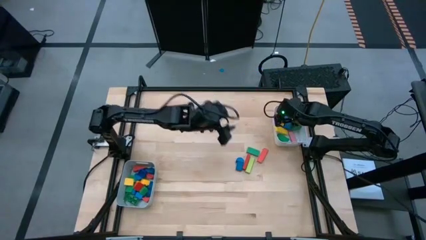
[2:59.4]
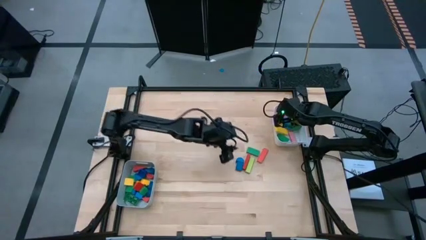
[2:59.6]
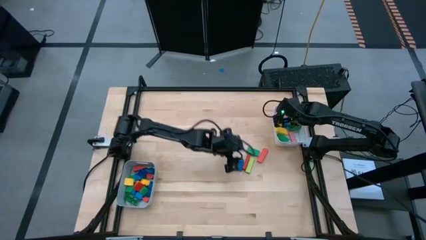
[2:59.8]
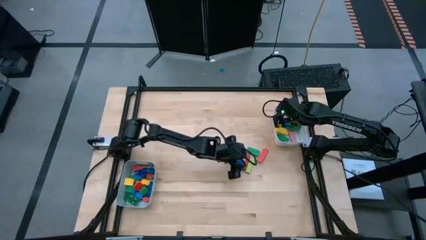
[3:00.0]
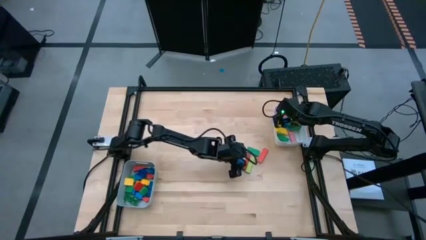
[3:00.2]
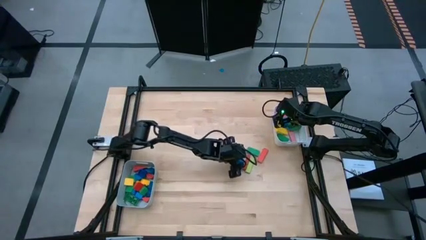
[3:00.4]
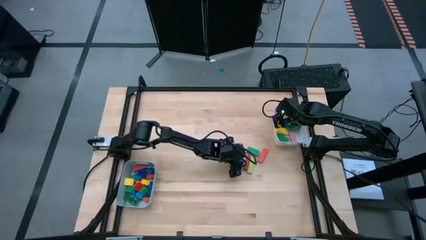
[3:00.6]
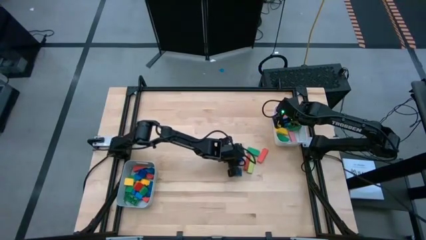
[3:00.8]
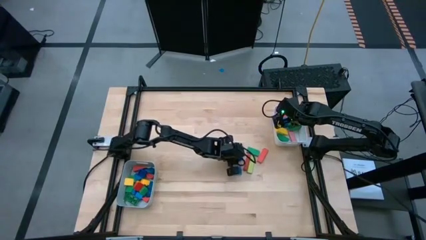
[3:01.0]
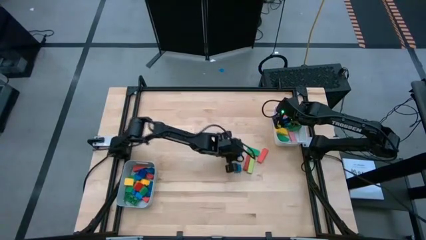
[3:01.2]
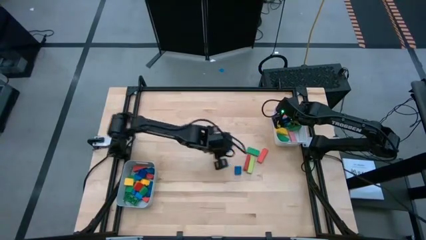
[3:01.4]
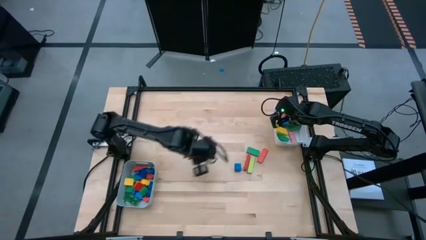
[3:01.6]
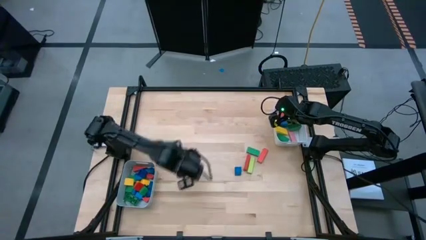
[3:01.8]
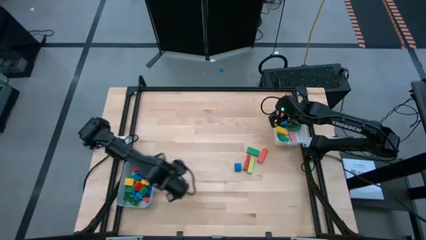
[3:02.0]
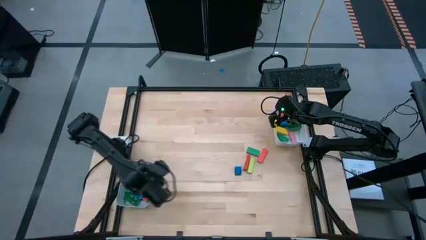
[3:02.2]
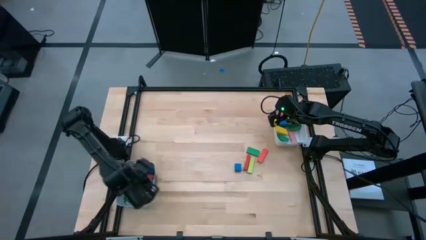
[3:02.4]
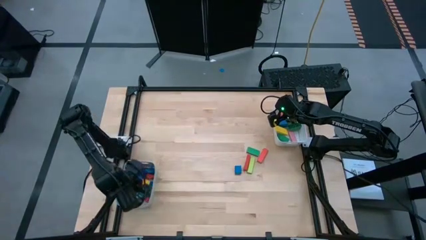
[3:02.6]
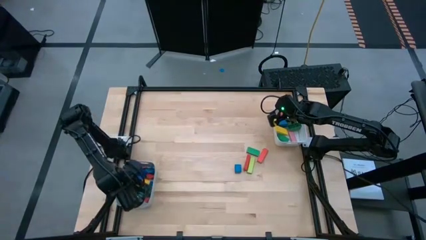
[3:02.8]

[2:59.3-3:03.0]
Task: Sort blocks by size
Put the blue half cylindrical block into the gray bin

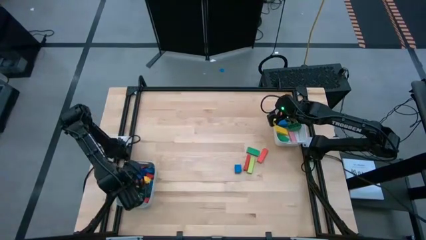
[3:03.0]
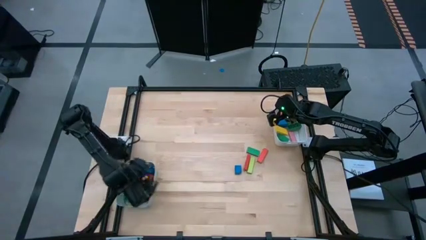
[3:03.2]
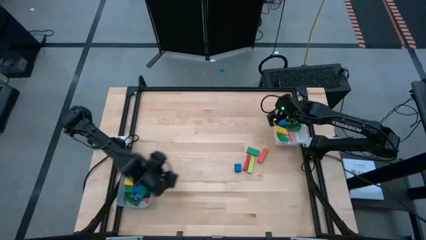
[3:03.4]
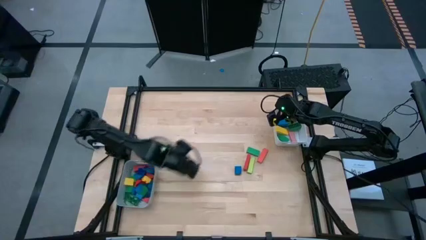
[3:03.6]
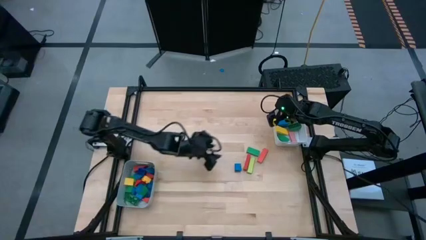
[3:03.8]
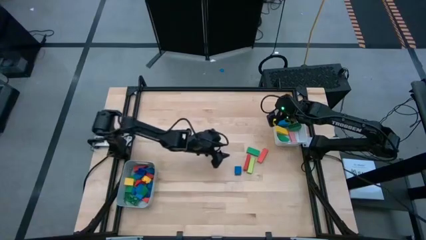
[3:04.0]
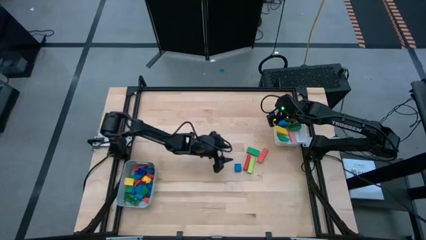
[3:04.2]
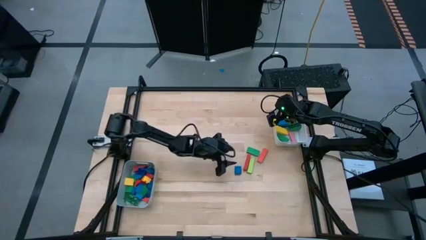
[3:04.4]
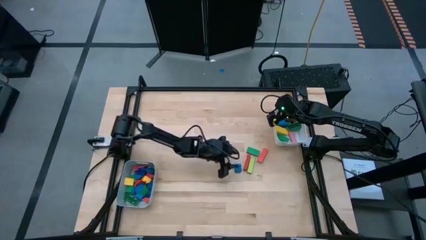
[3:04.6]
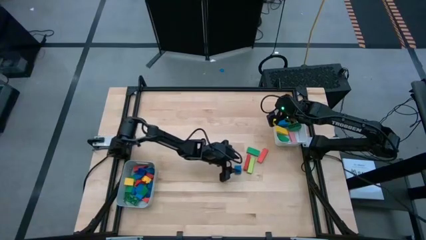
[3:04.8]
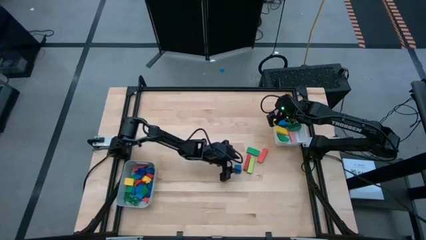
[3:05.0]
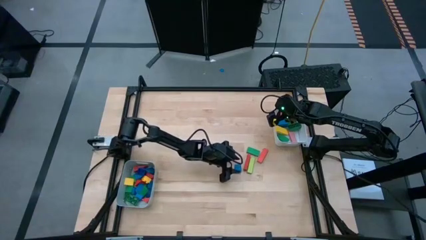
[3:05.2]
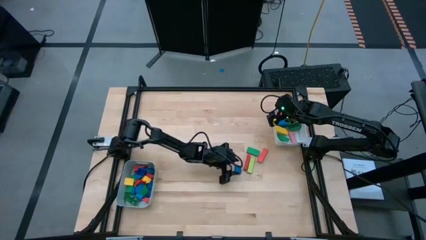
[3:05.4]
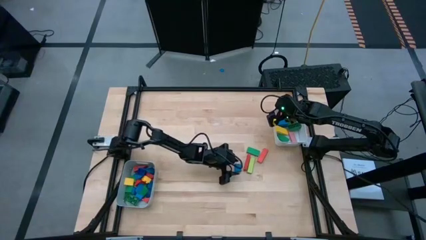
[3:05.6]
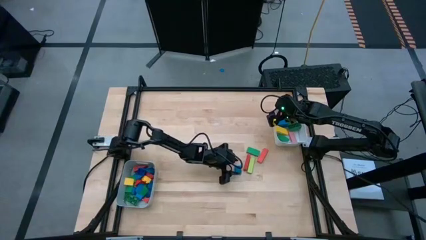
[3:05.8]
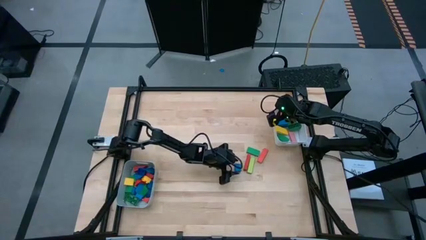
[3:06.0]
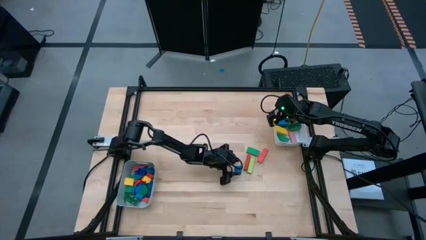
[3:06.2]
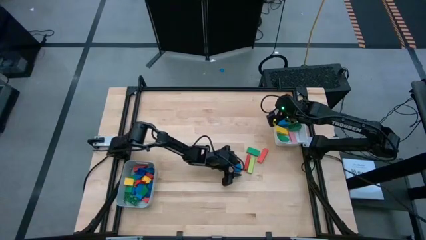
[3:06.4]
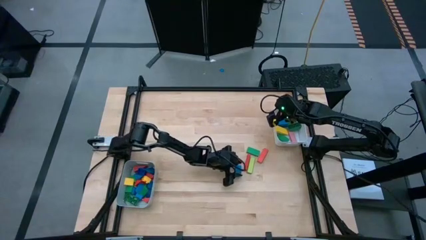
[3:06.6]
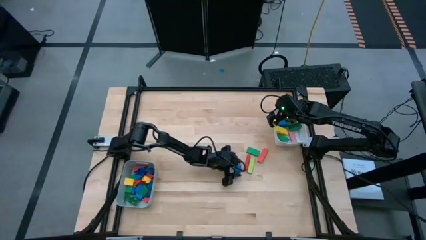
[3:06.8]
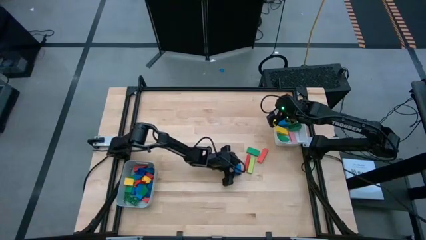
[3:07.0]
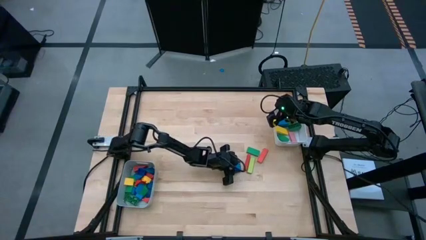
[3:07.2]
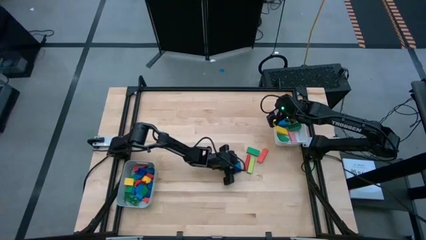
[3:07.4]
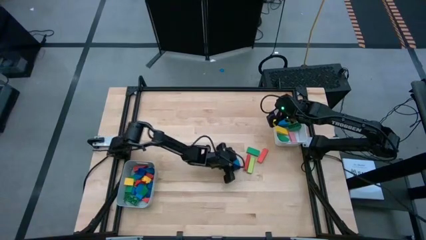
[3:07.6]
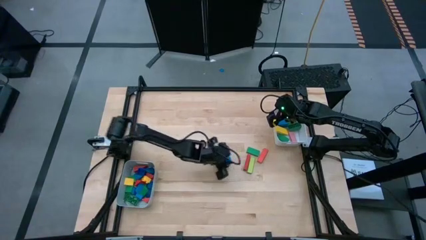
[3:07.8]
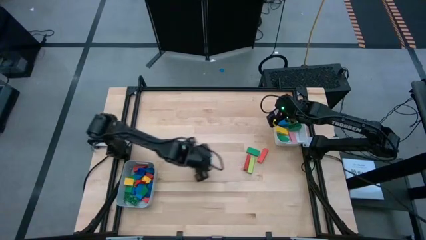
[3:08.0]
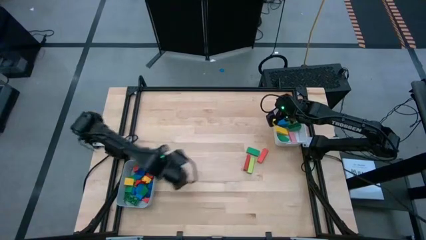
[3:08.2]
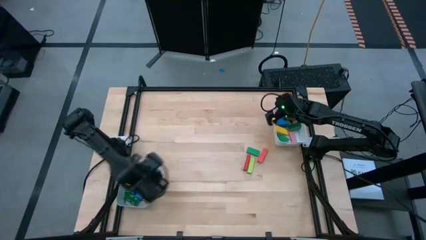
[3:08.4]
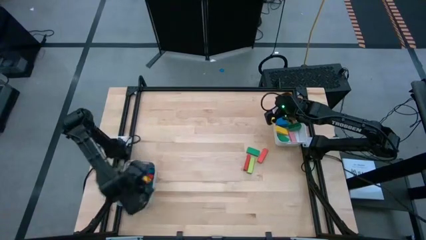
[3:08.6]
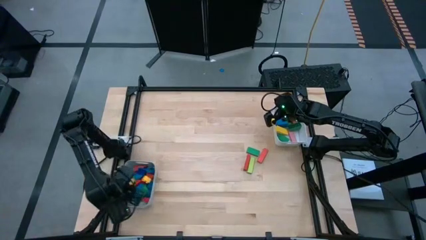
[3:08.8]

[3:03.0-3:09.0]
Put the blue half cylindrical block into the gray bin

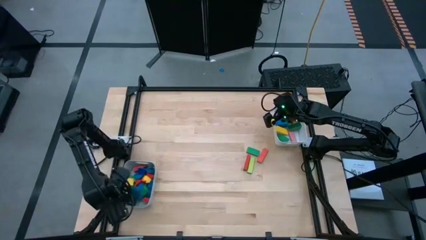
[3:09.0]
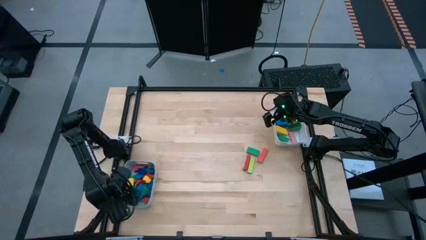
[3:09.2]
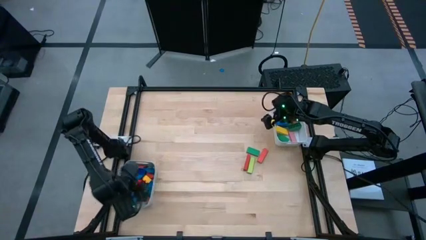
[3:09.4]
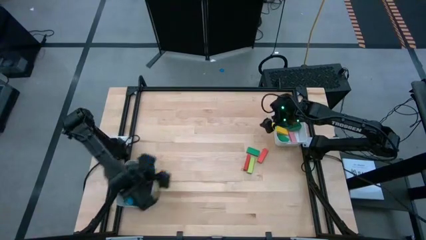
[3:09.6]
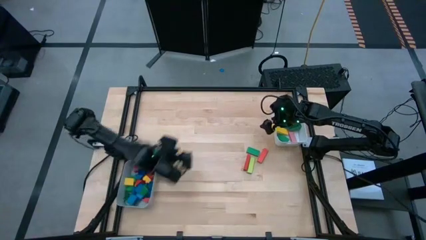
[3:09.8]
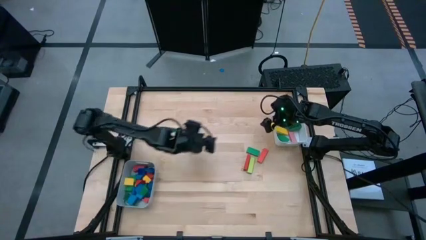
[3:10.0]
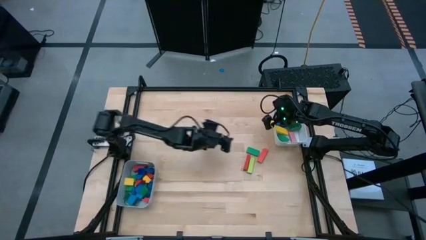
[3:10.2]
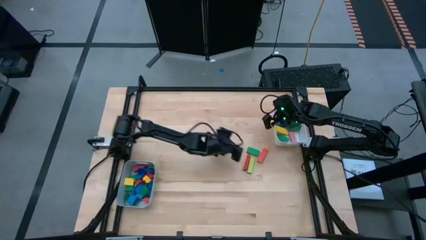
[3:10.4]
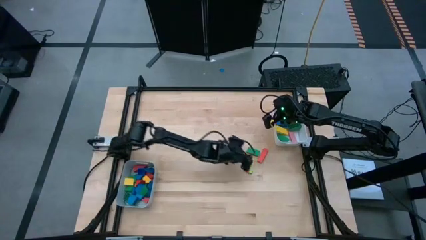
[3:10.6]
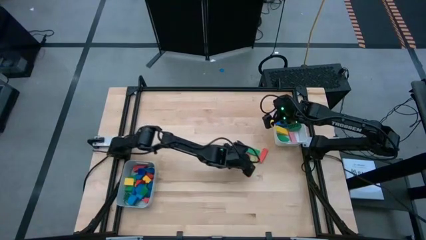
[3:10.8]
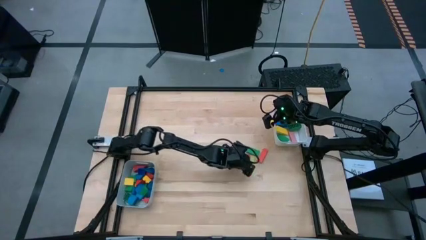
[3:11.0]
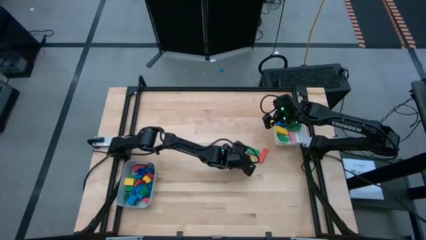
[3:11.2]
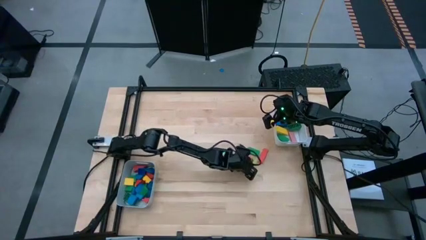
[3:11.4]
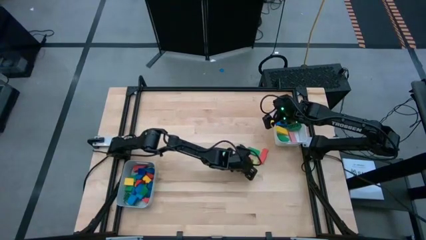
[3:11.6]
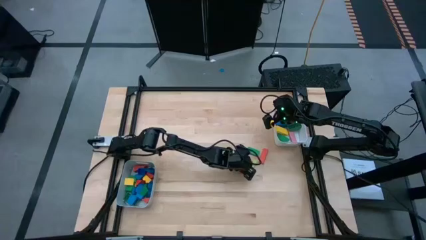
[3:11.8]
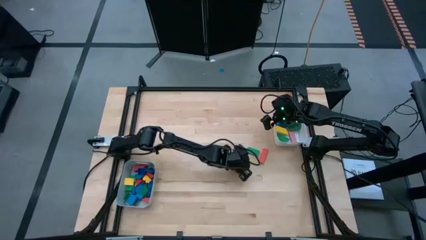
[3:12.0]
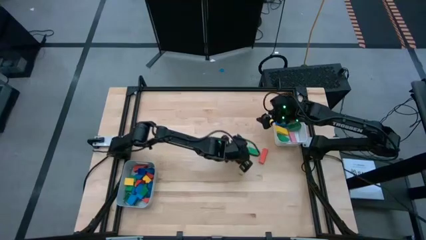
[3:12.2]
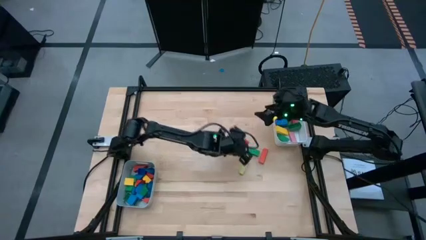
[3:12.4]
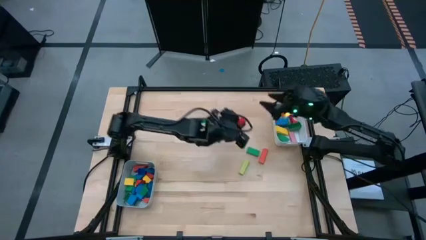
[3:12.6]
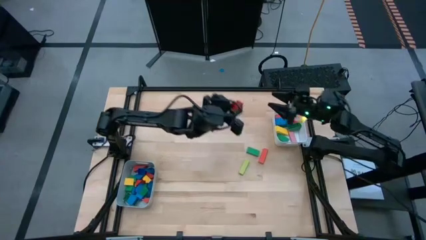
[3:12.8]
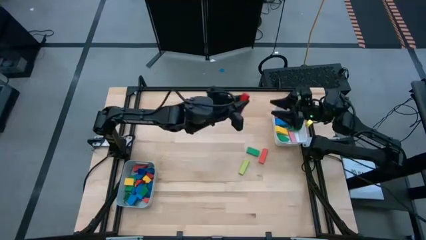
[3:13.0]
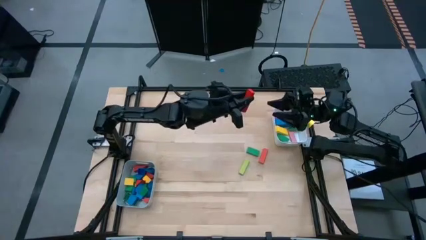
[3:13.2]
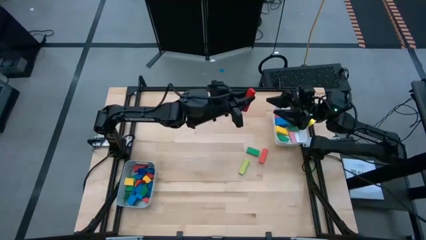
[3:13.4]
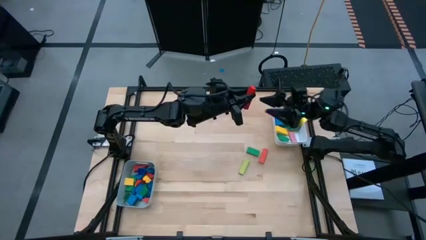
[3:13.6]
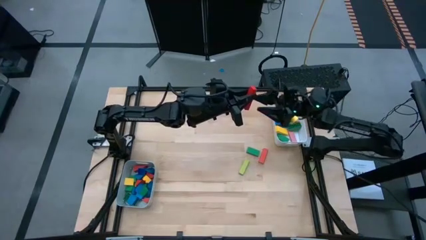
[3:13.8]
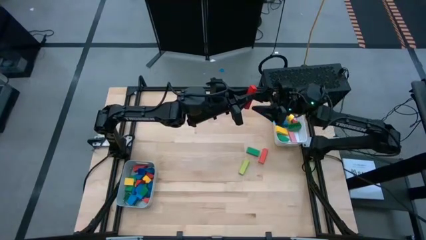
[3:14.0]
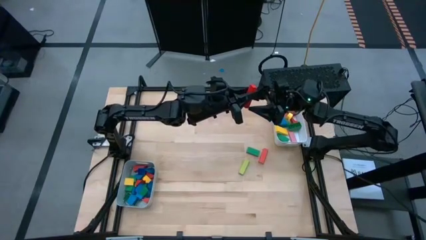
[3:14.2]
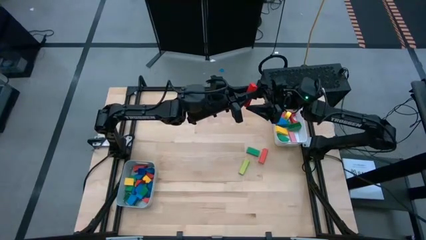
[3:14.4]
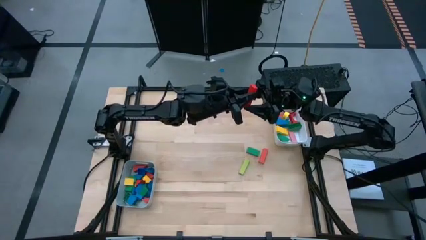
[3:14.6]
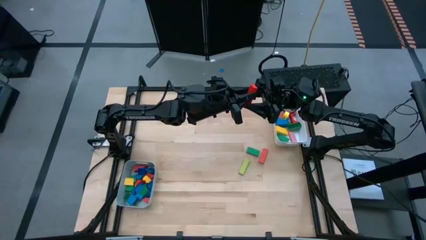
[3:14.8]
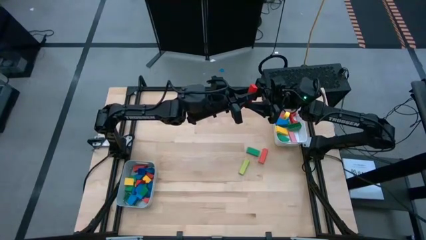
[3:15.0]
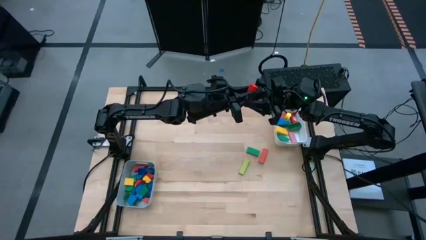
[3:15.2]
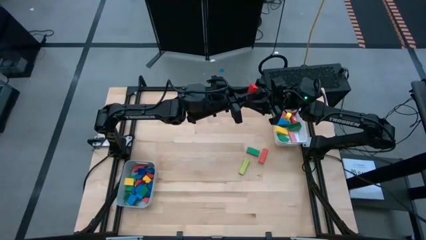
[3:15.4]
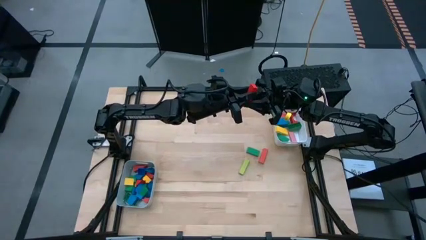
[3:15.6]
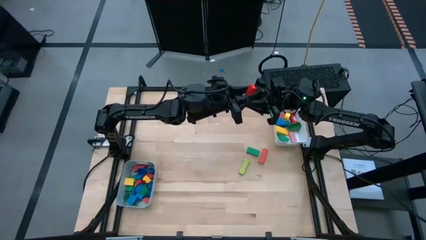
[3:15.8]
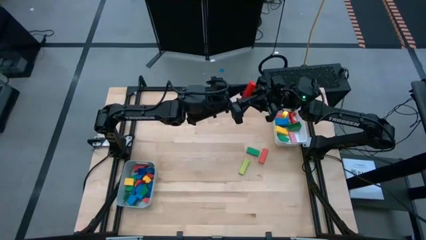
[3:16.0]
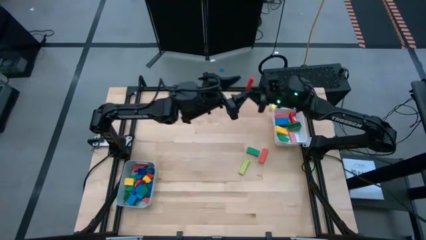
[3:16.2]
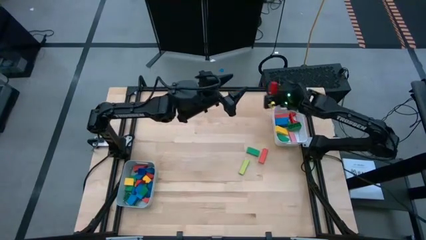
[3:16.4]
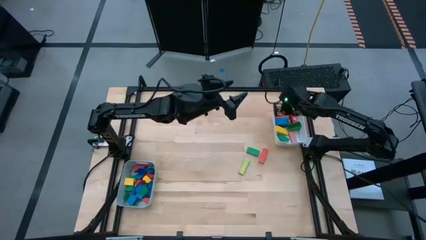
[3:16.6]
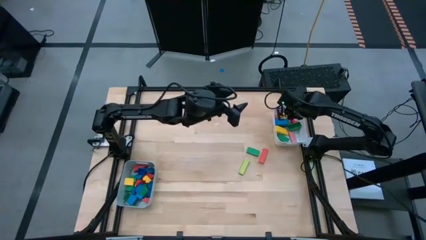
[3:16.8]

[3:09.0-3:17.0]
Put the orange block into the white bin
